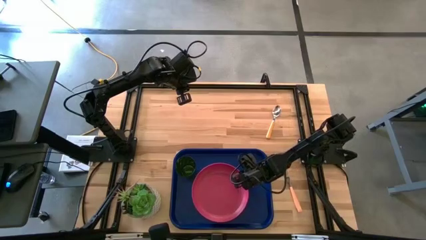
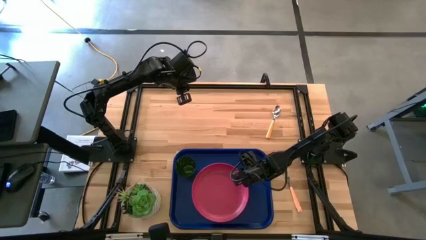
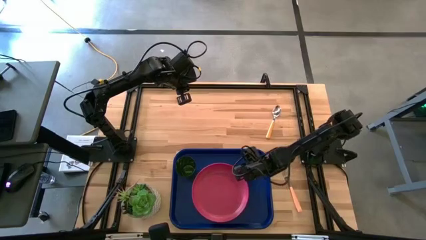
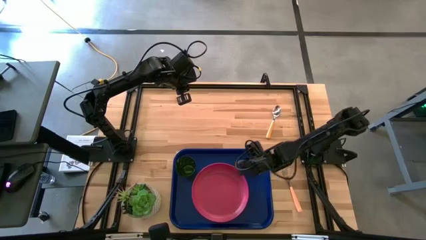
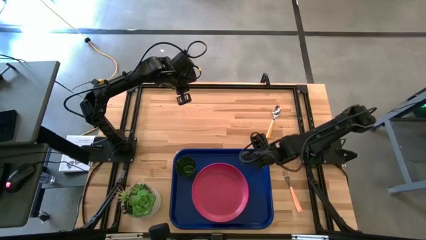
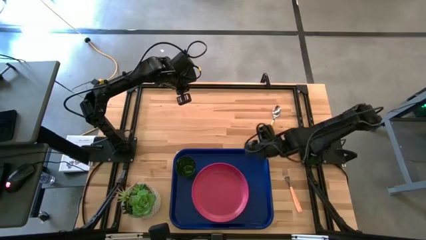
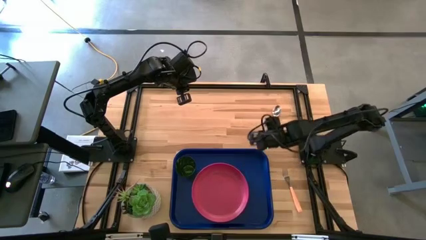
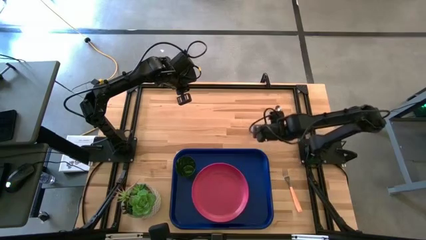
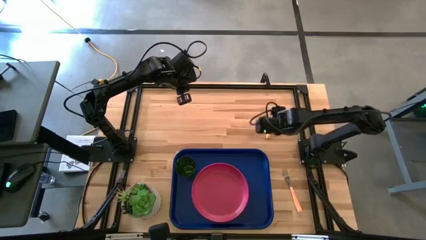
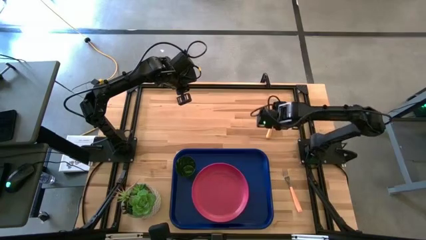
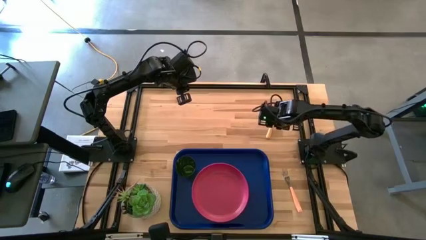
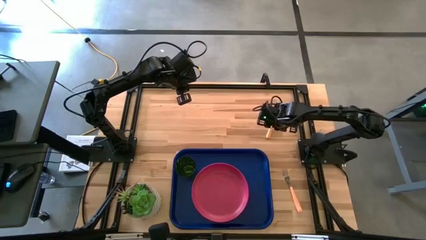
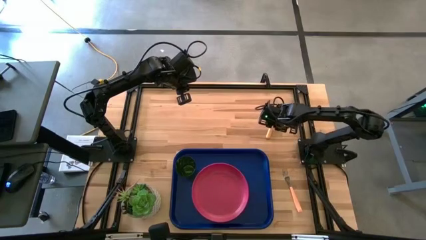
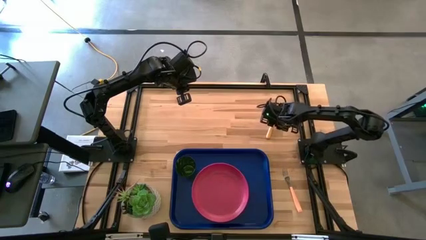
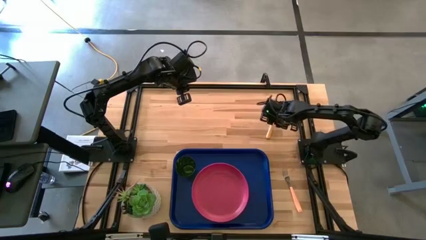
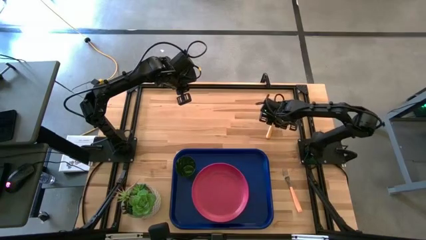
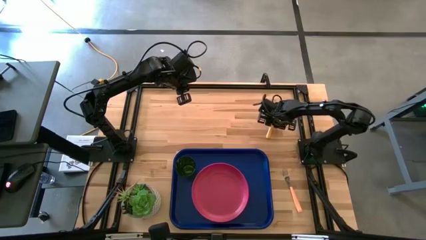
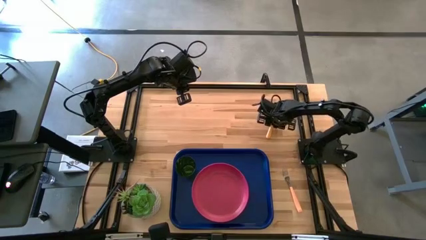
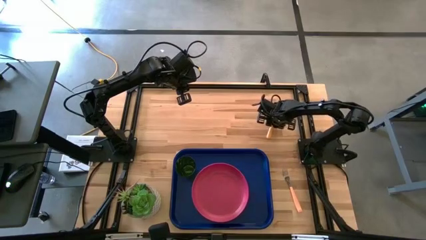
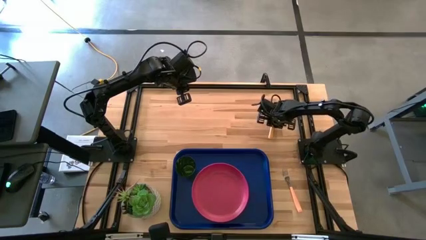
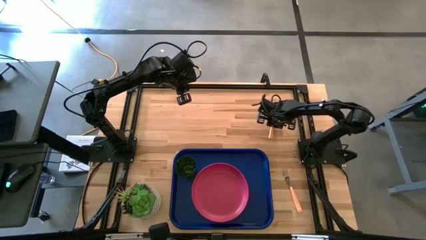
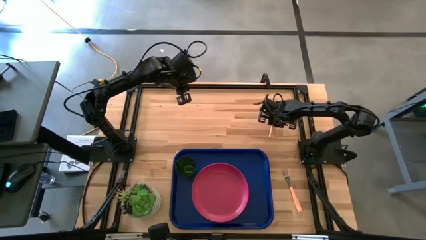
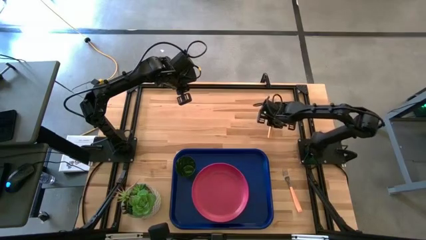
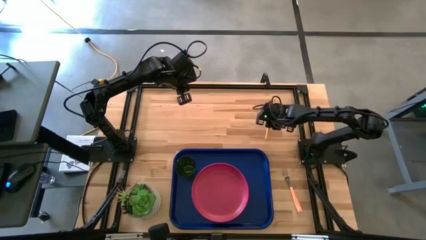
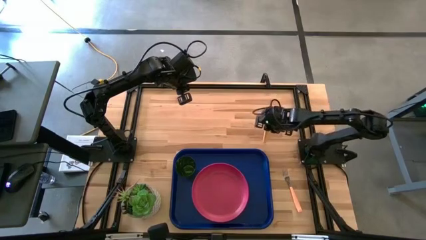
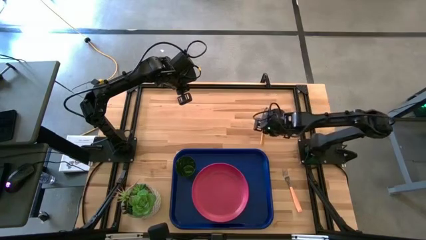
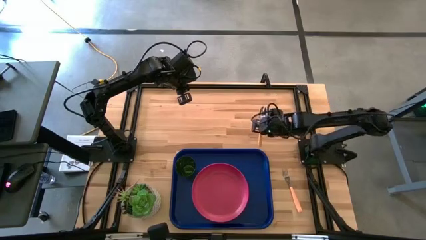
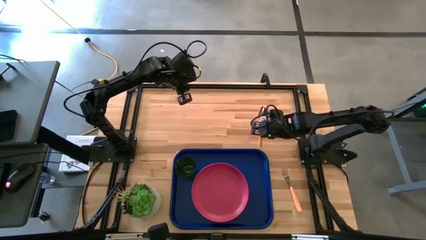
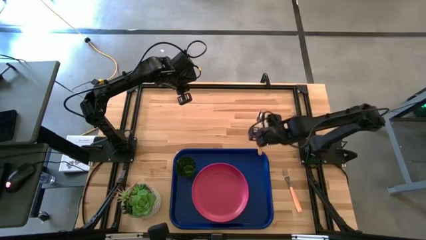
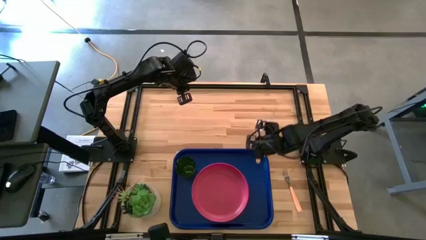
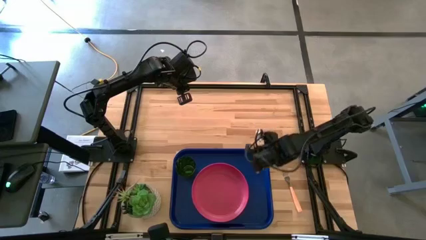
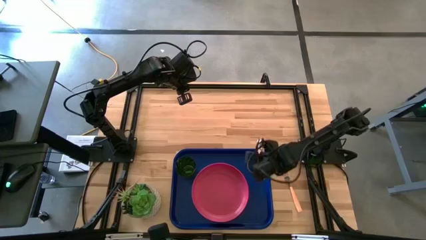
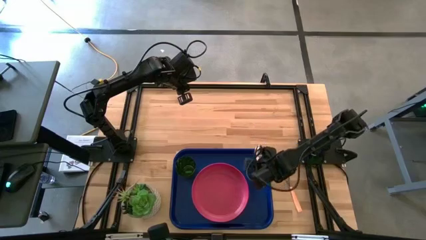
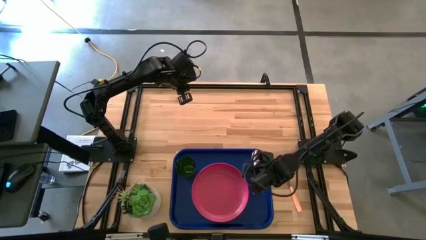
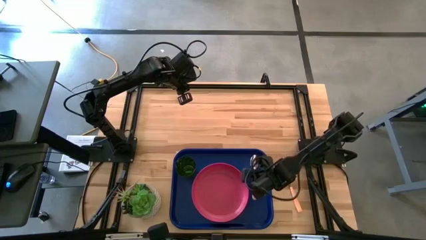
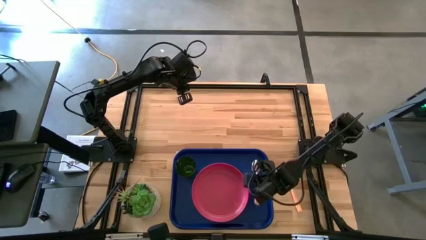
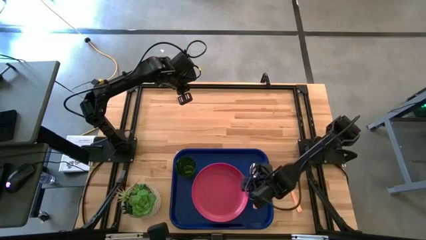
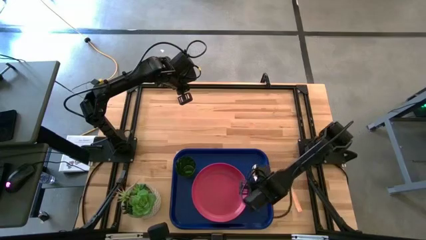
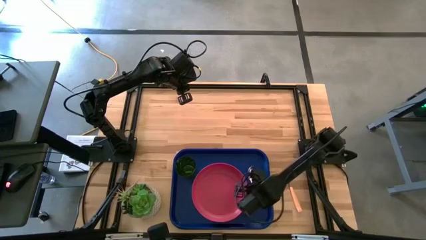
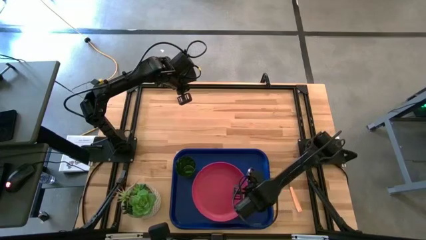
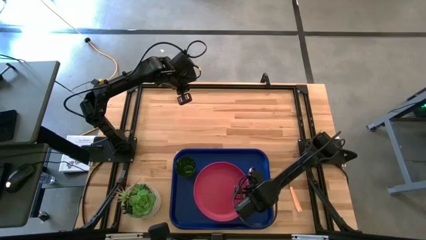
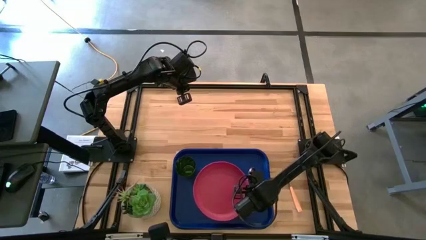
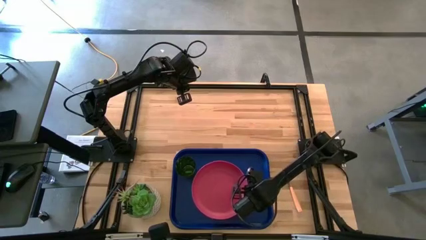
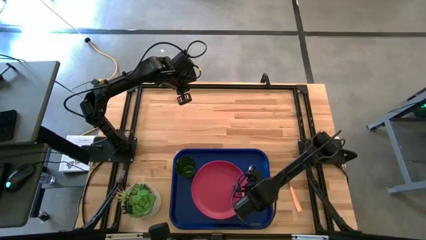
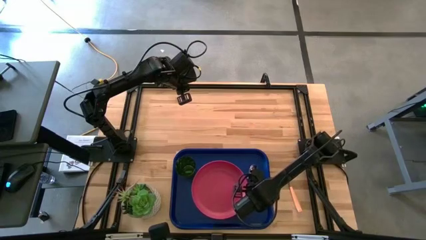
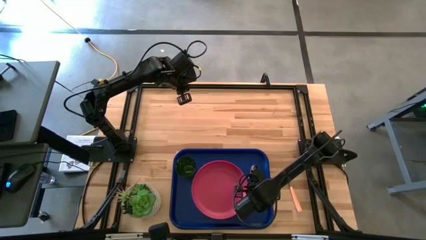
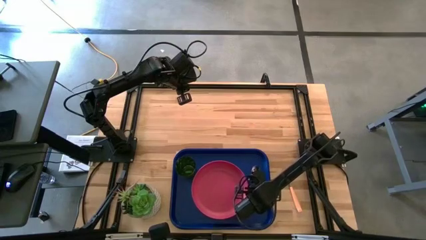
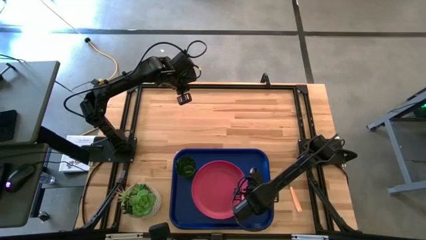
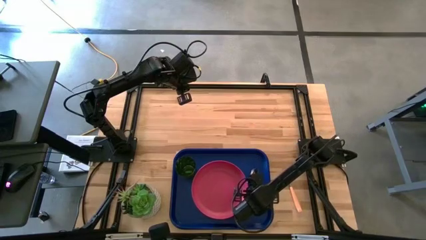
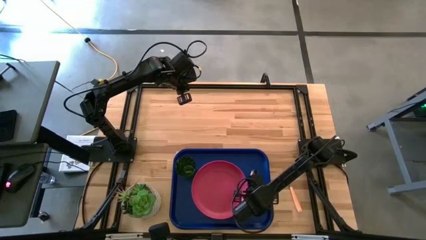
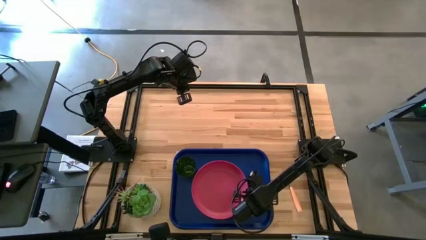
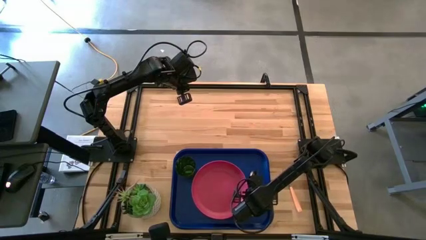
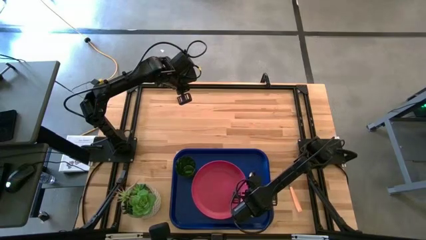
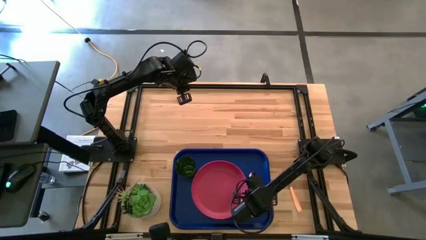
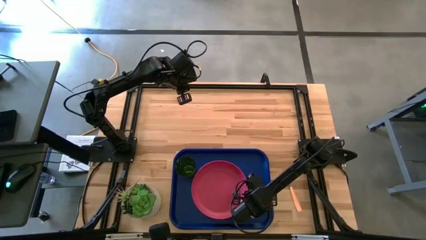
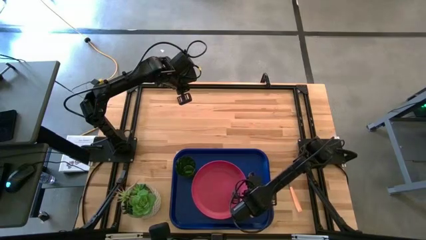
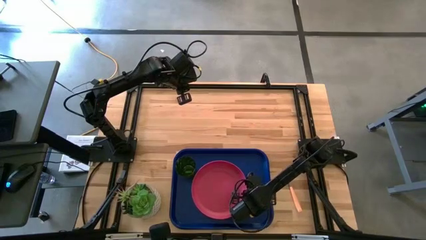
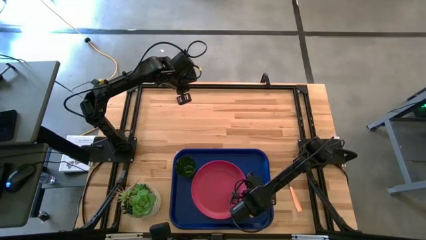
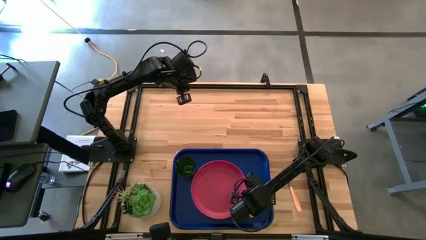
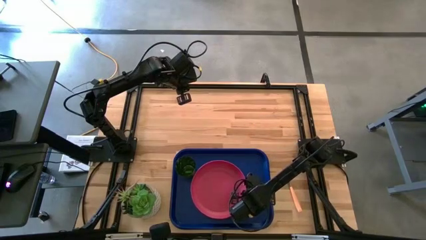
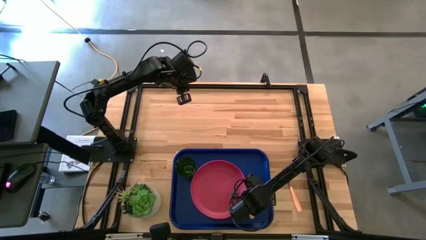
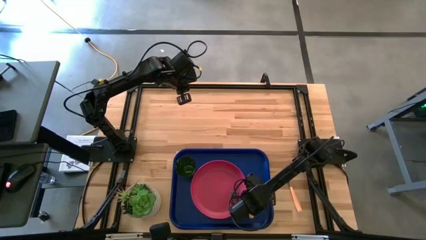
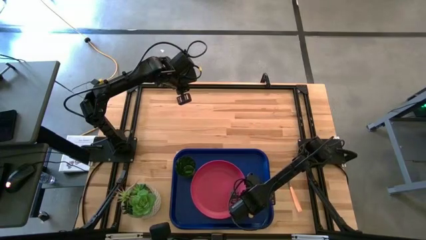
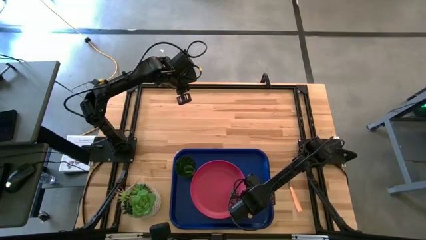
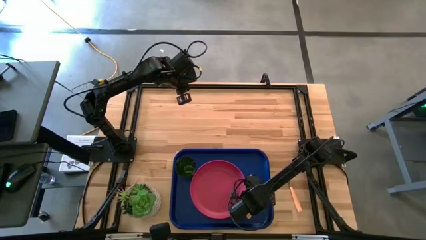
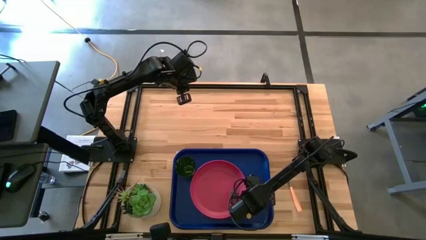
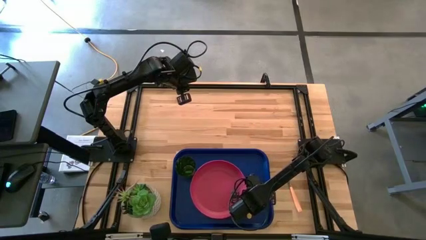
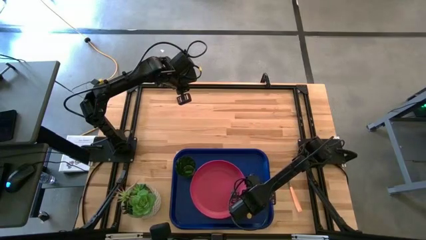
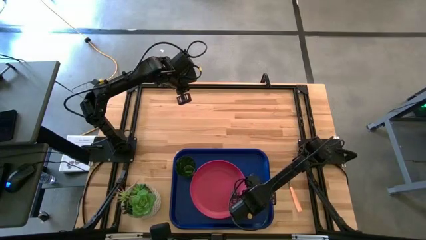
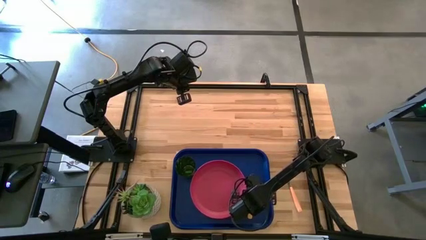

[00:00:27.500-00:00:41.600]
Task: Pick and place plate/cup/fork/spoon on tray
Put the yellow spoon on the blue serving tray to the right side of the pink plate

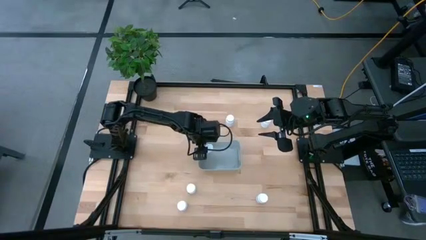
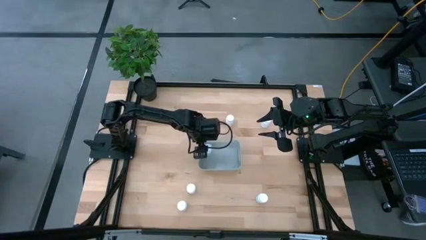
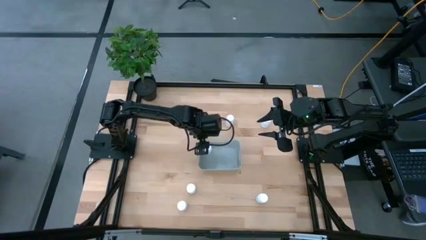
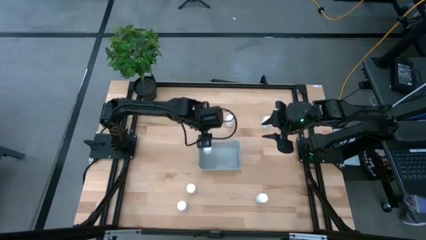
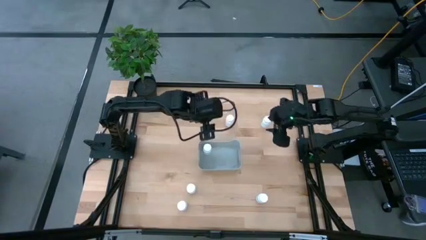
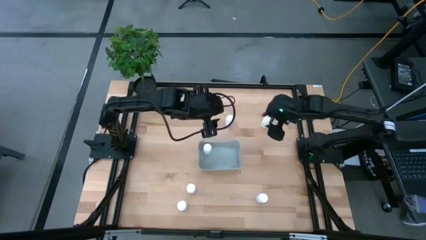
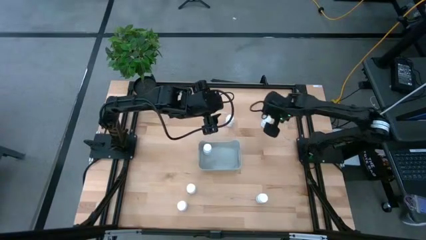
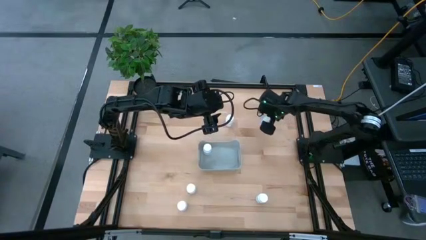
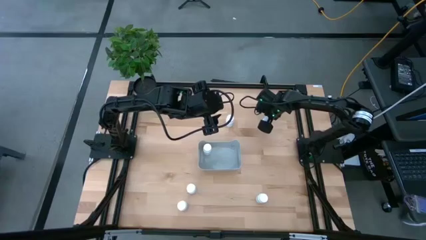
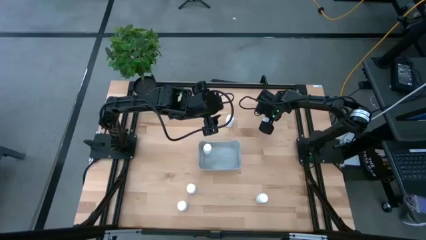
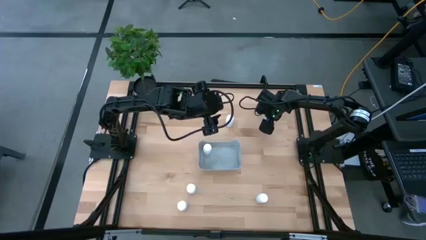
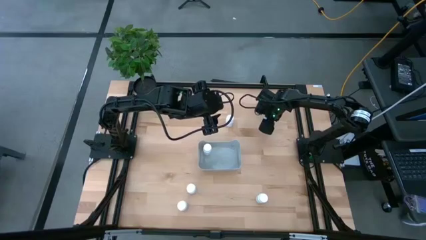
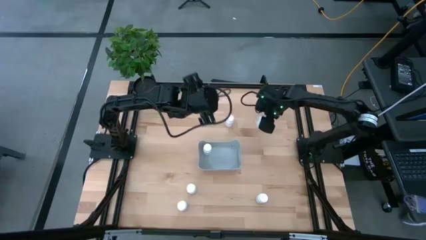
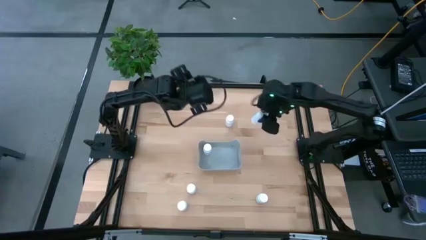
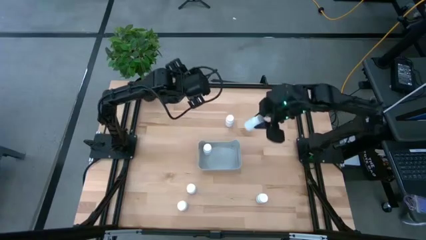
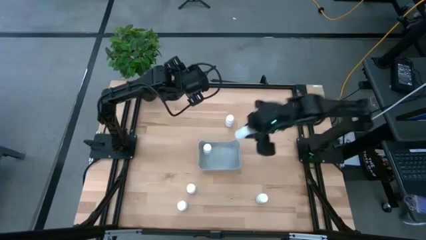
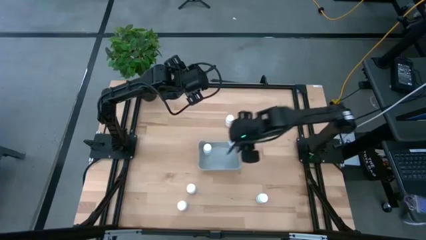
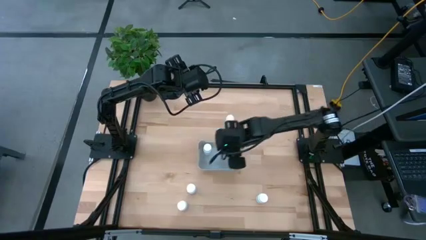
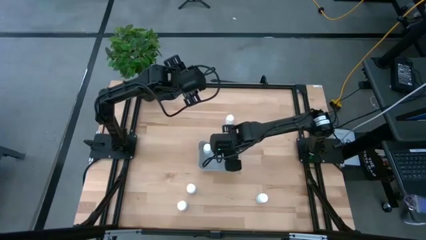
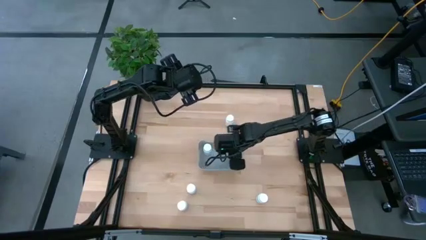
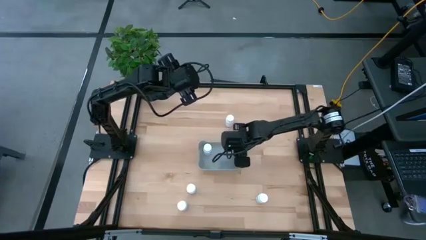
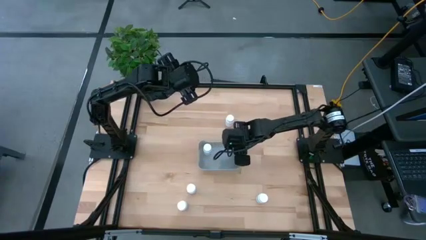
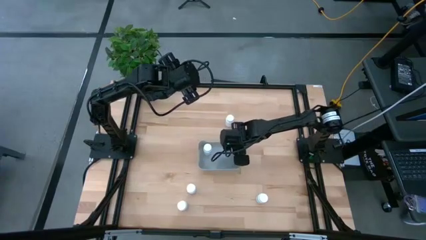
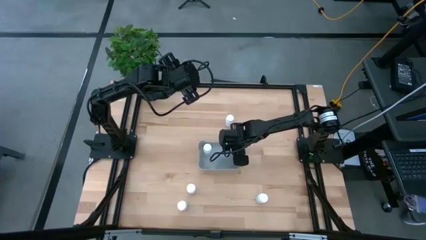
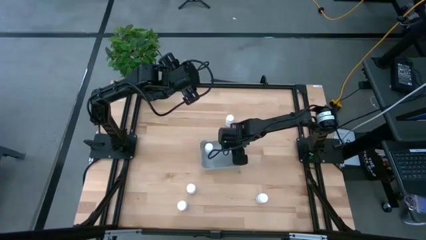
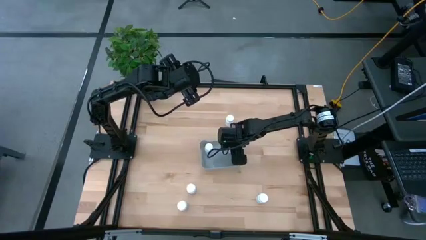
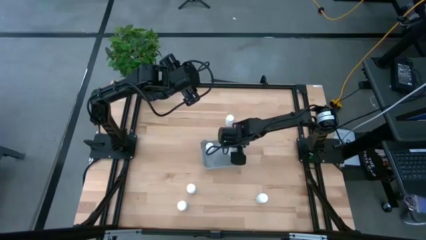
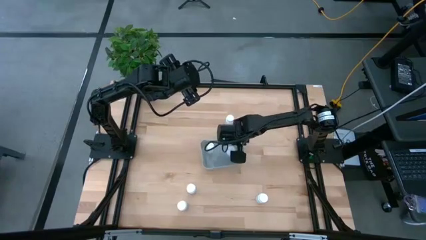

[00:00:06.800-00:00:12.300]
Task: Pick and place pill bottles into a basket
Put the white medicine bottle into the gray bin
